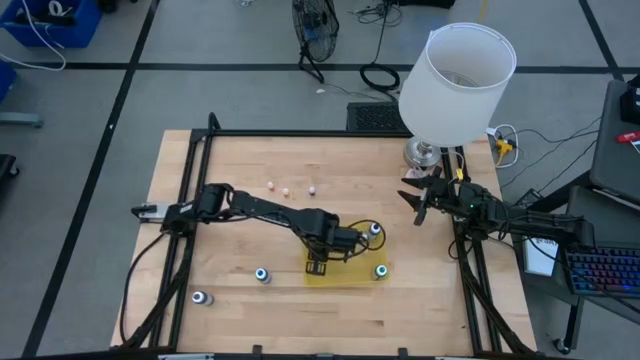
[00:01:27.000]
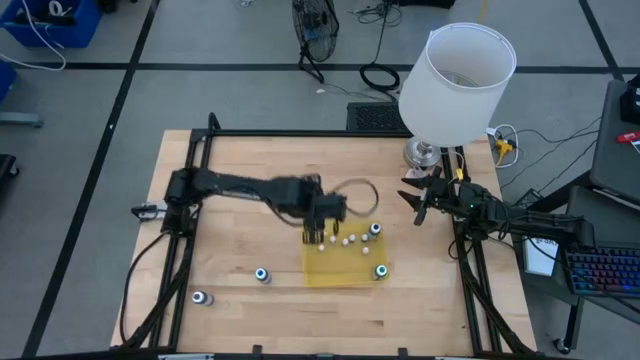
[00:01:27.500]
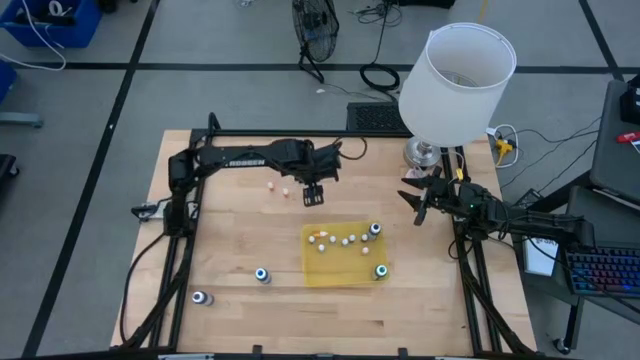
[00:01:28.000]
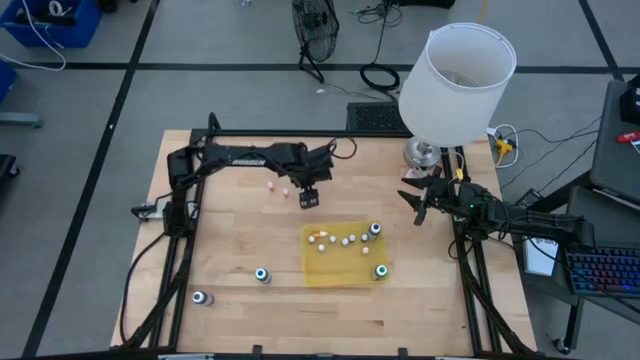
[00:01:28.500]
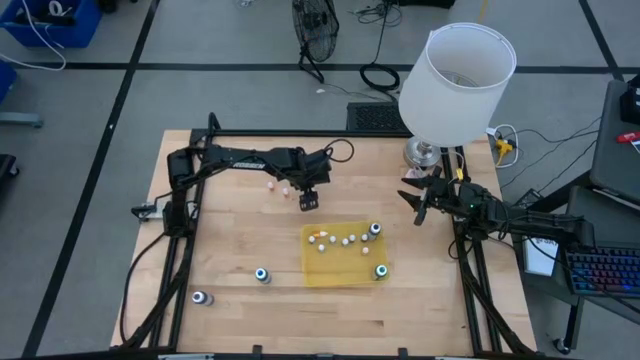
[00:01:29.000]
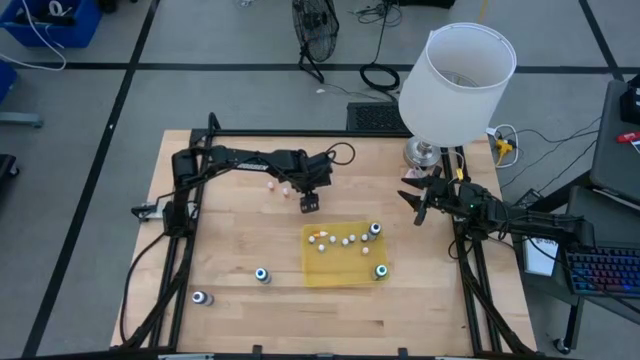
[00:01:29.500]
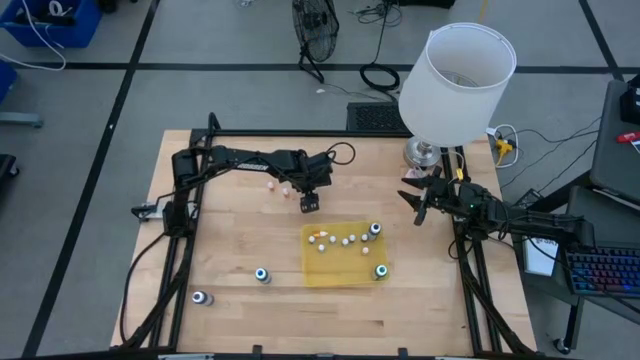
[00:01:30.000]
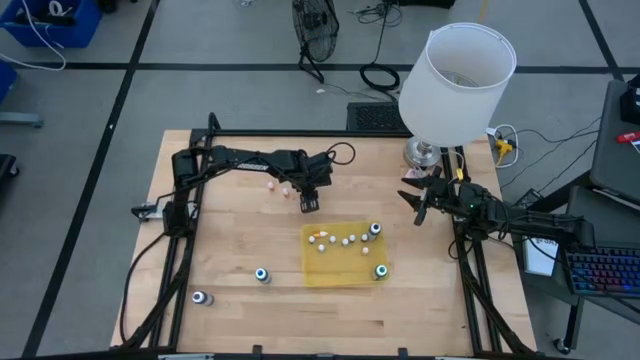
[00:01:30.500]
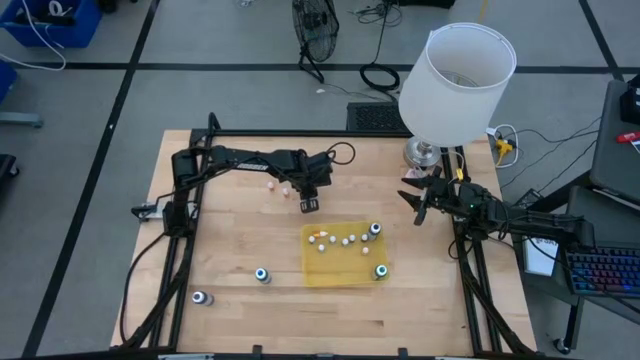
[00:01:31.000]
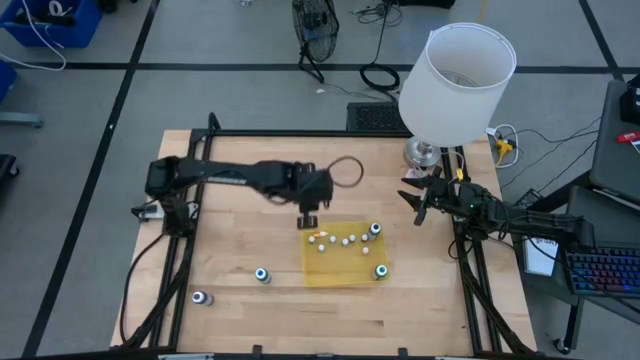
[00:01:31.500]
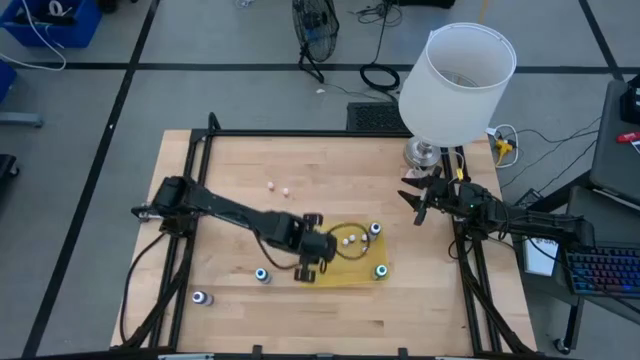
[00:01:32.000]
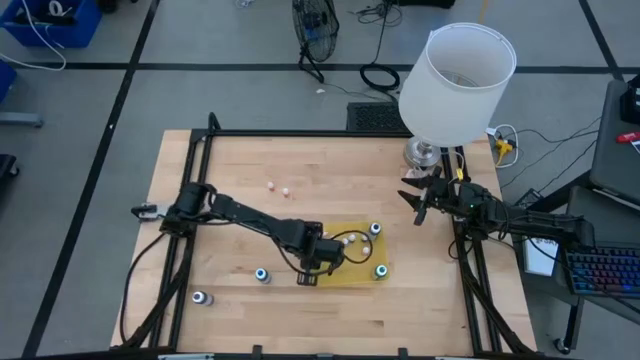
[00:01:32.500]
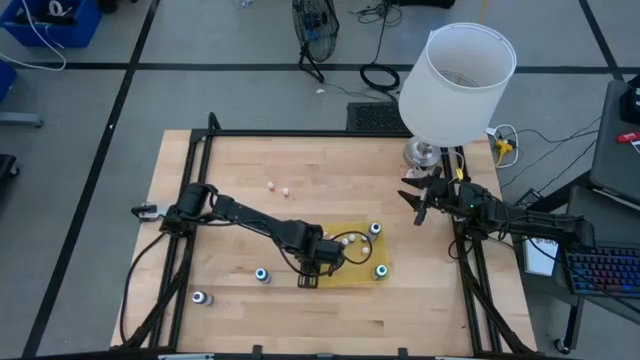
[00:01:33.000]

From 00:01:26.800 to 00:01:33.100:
Task: Pick & Place food coloring
Put the small red food coloring bottle into the yellow bin

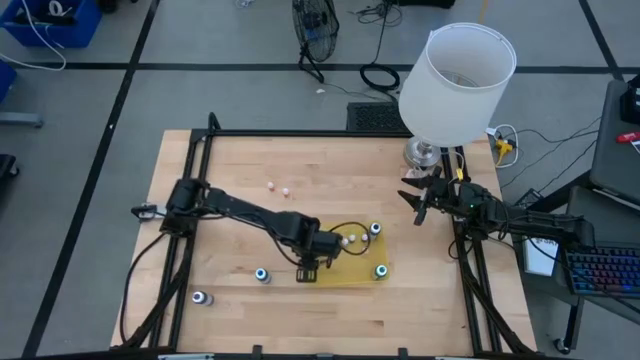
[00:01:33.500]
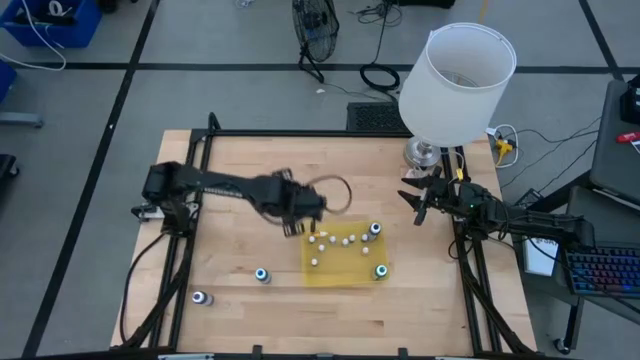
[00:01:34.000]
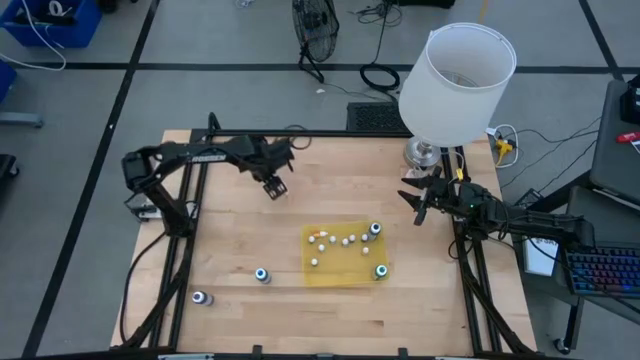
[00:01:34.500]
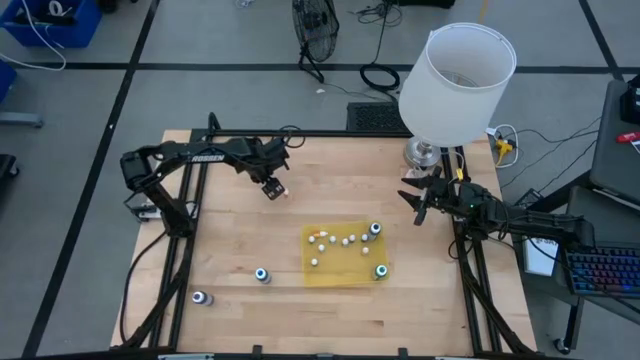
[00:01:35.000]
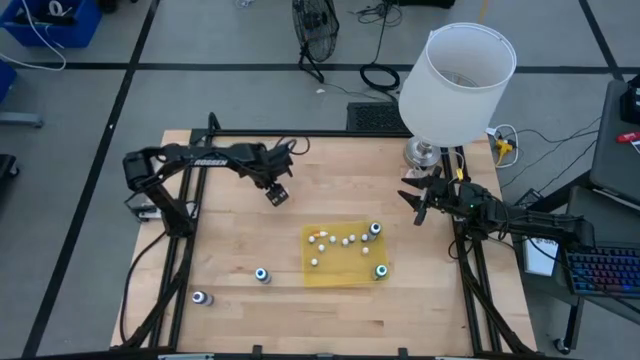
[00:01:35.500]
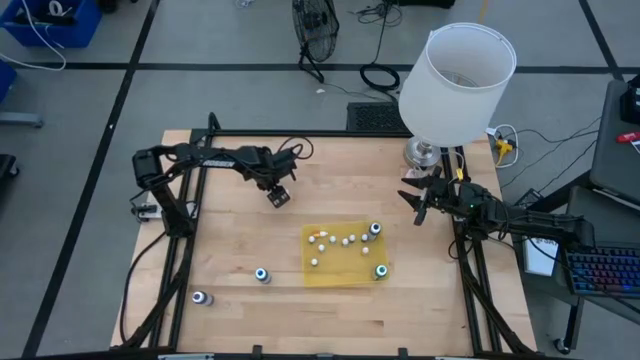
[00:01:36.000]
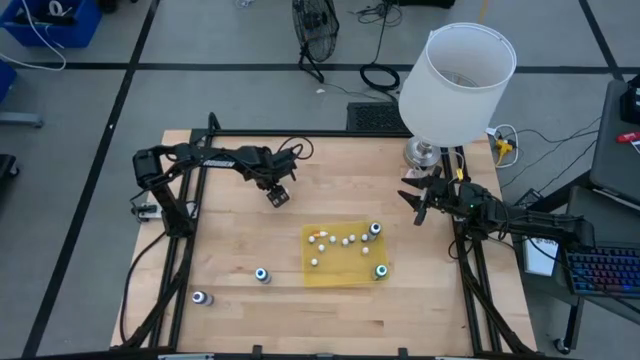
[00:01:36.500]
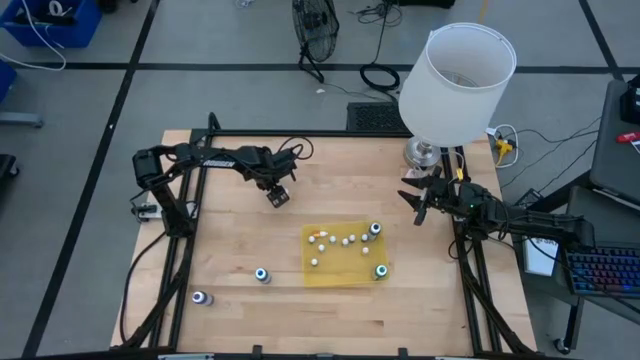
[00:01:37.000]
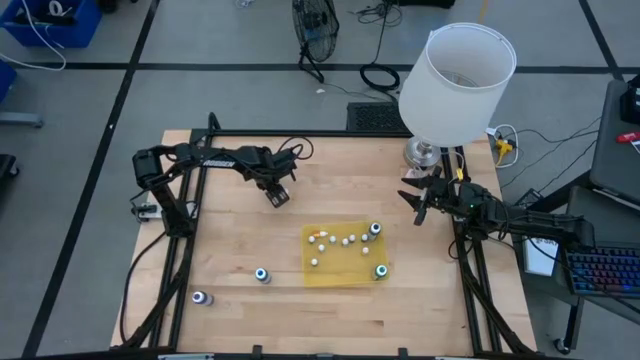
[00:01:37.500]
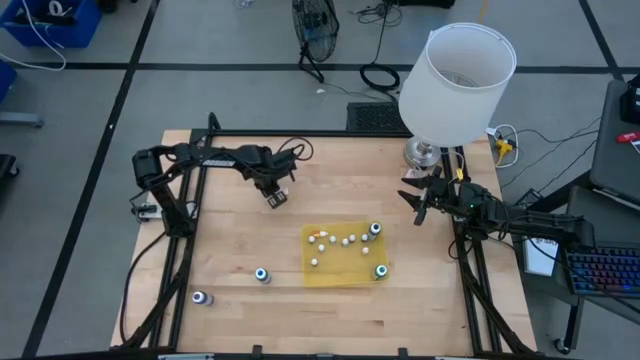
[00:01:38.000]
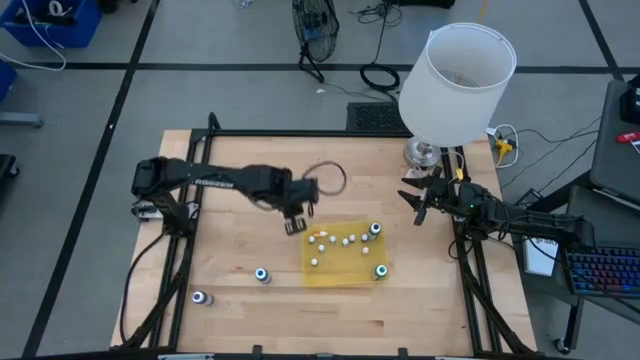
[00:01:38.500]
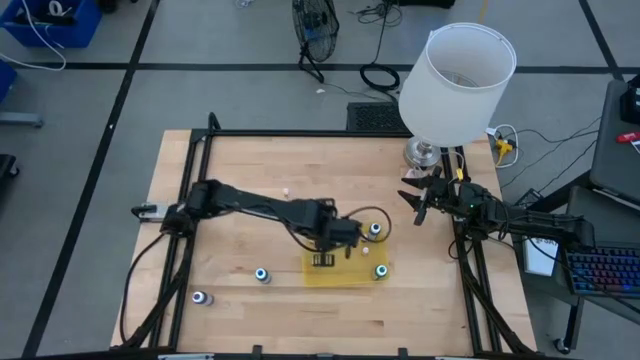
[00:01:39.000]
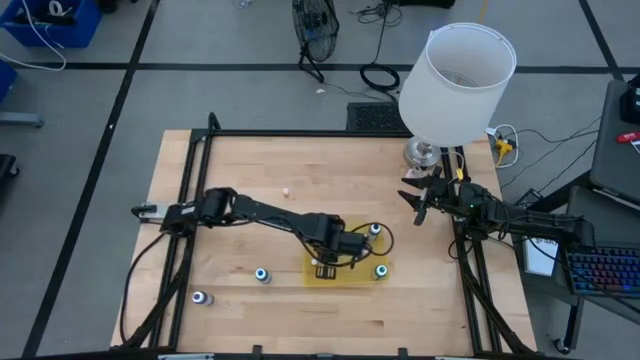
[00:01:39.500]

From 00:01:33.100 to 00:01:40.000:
Put the left small orange food coloring bottle into the yellow bin

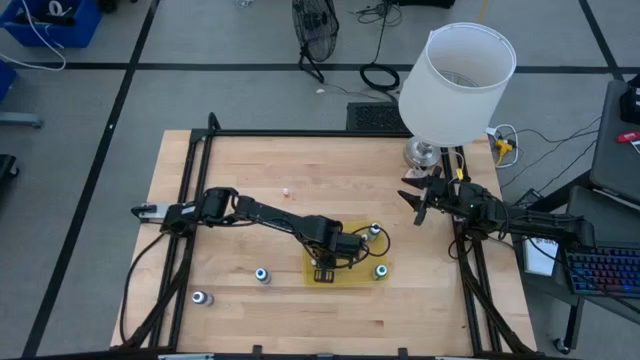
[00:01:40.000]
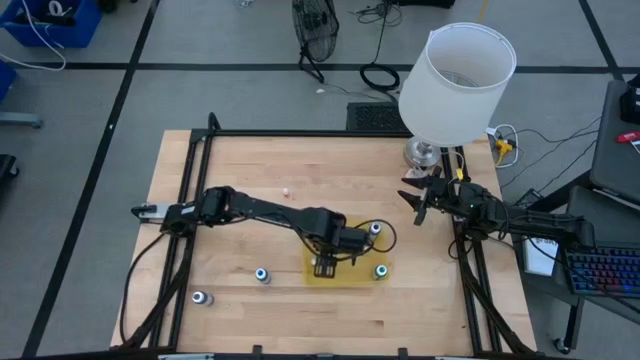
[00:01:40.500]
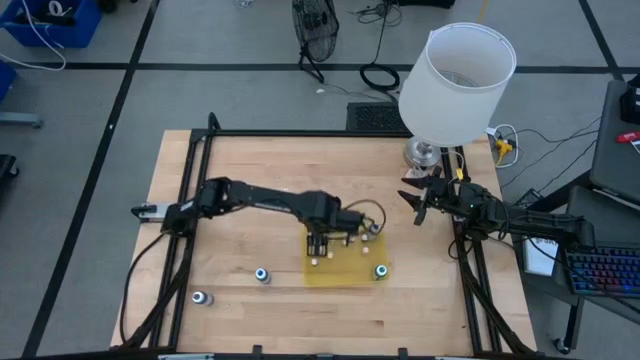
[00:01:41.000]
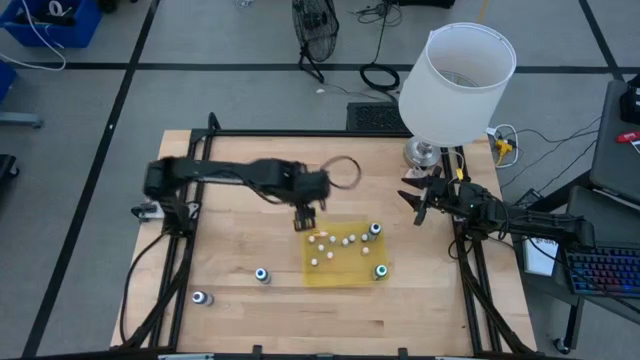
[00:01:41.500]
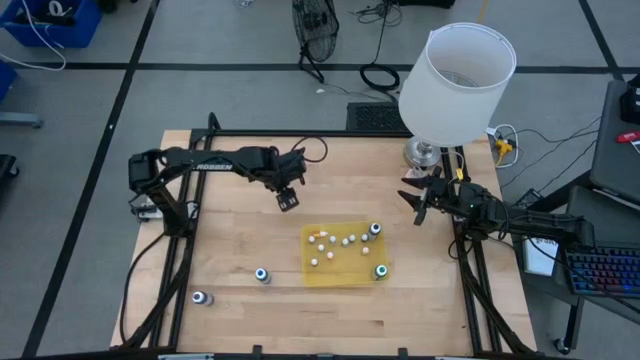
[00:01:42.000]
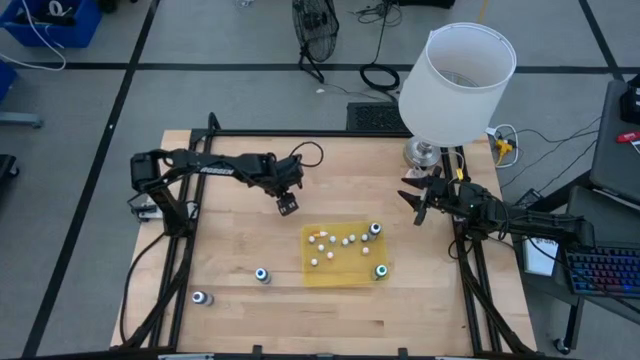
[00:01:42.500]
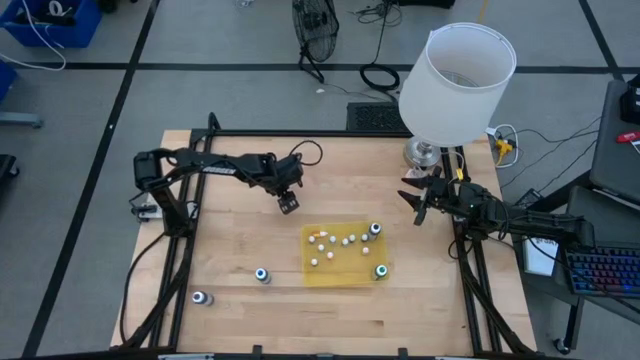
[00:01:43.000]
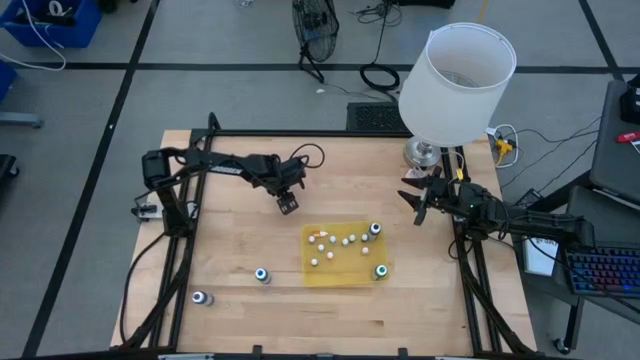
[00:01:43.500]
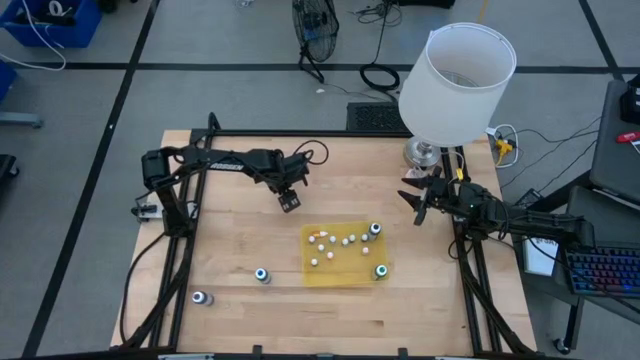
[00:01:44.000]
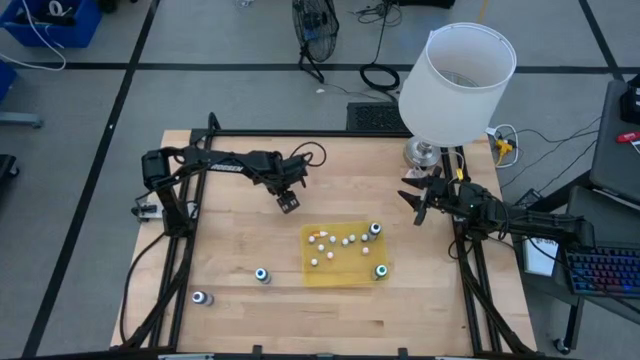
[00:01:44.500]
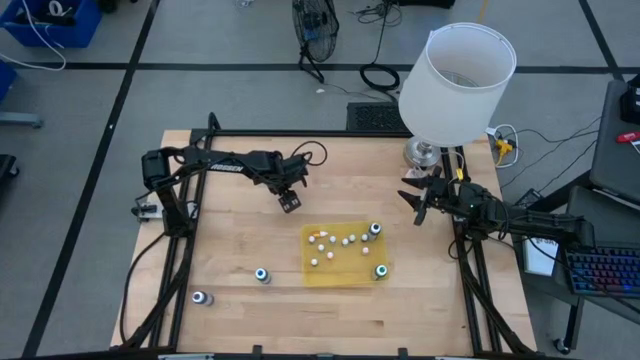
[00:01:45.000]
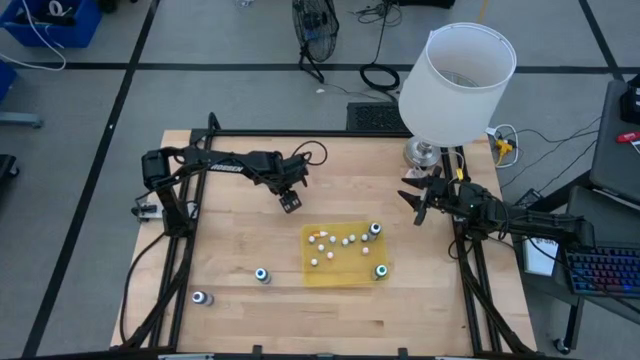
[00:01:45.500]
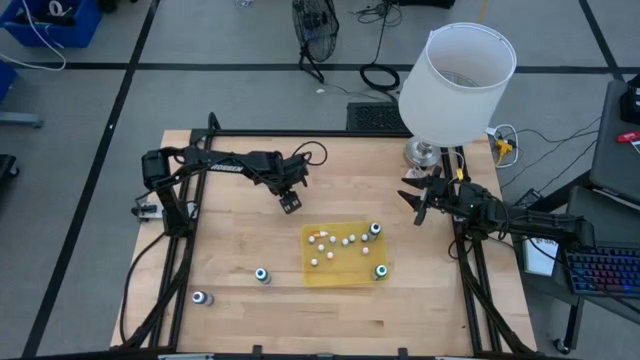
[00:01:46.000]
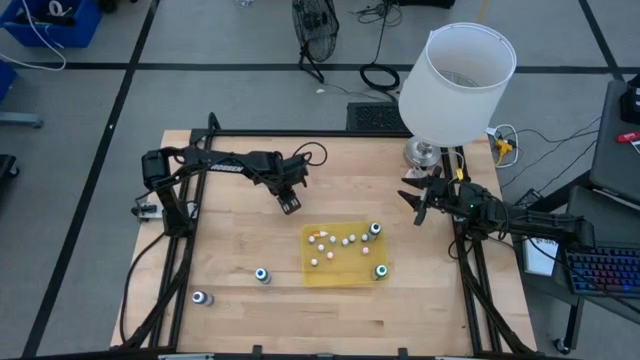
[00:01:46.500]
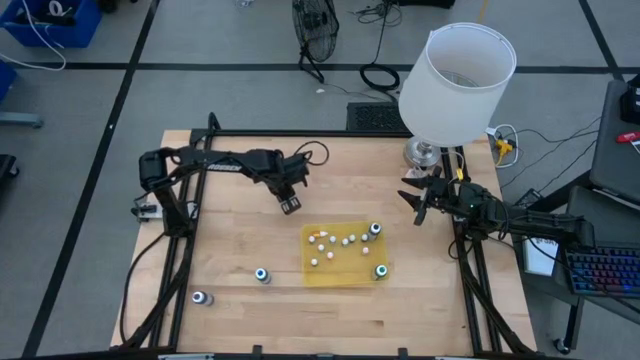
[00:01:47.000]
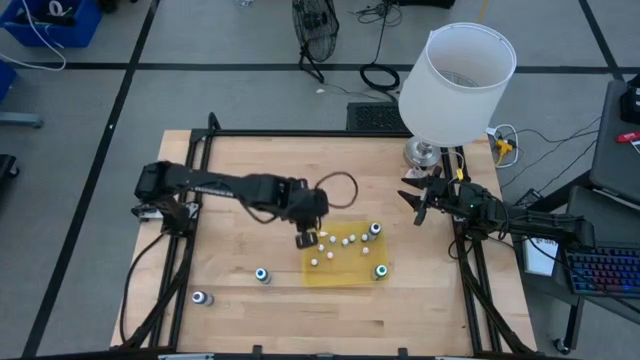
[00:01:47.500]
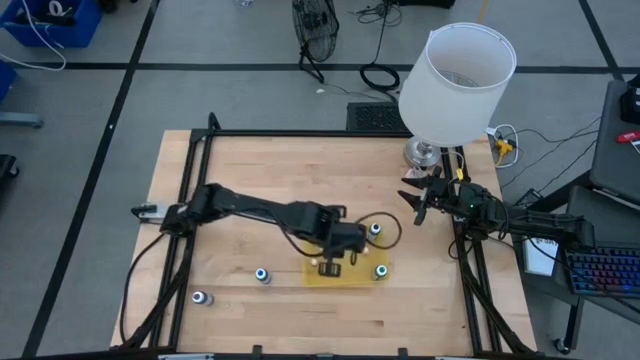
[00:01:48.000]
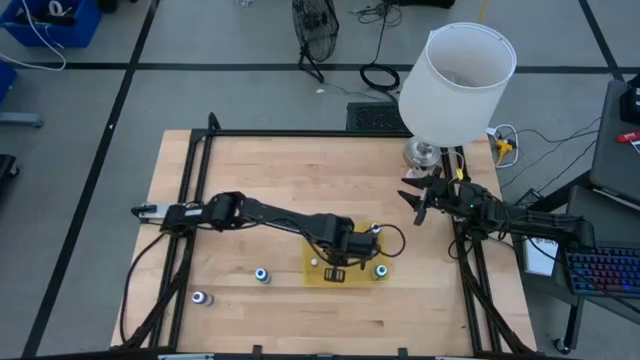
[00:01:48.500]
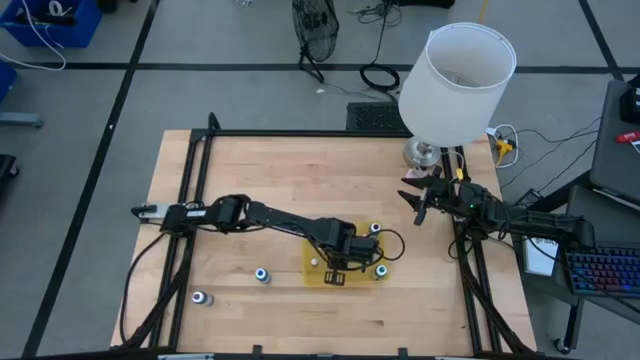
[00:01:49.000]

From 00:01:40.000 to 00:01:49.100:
Put the small orange food coloring bottle into the yellow bin
